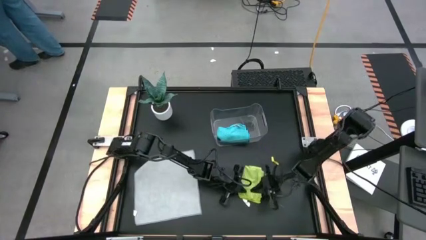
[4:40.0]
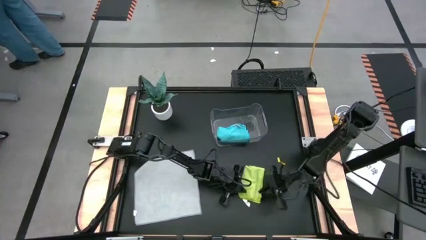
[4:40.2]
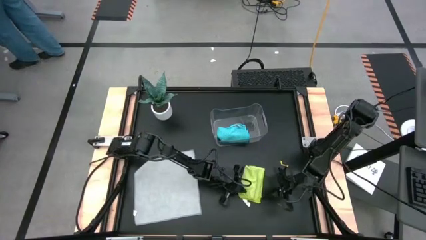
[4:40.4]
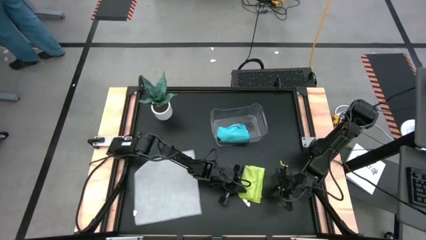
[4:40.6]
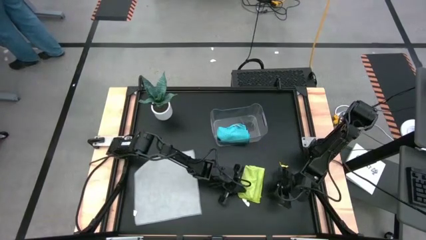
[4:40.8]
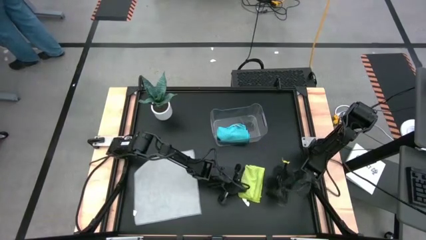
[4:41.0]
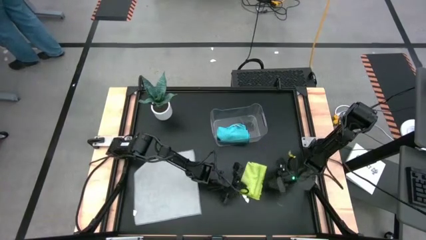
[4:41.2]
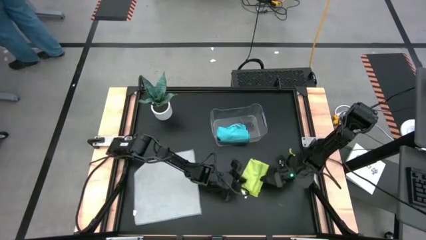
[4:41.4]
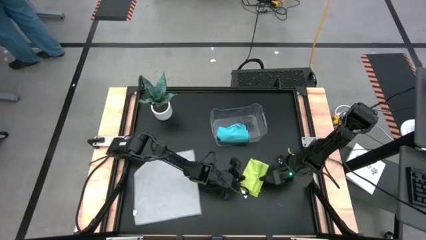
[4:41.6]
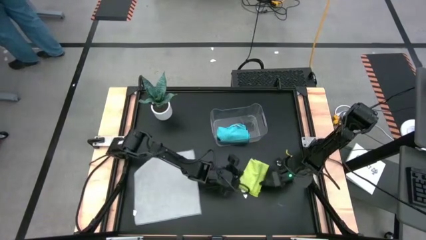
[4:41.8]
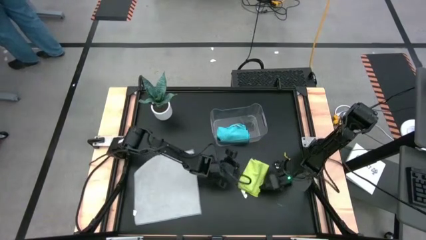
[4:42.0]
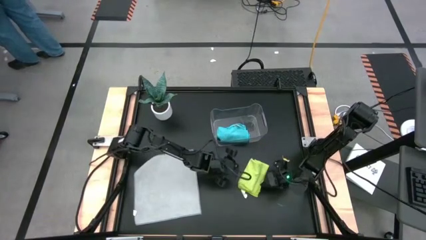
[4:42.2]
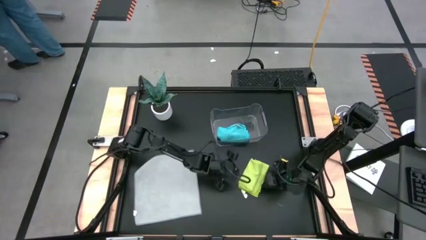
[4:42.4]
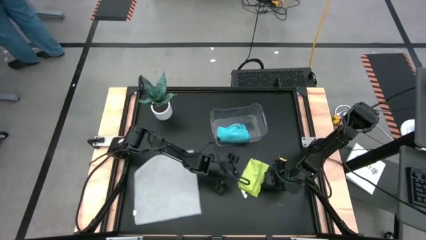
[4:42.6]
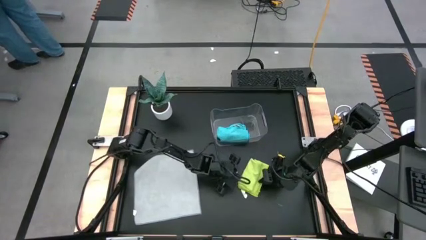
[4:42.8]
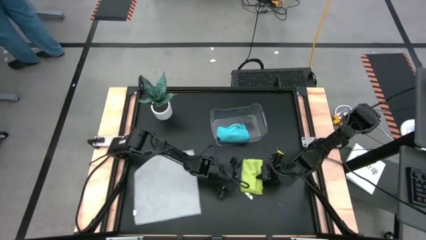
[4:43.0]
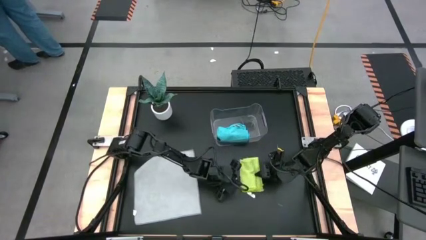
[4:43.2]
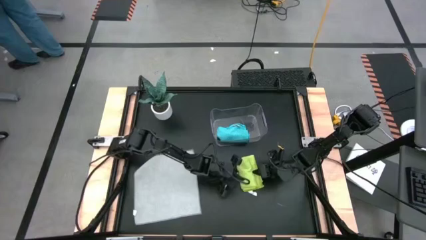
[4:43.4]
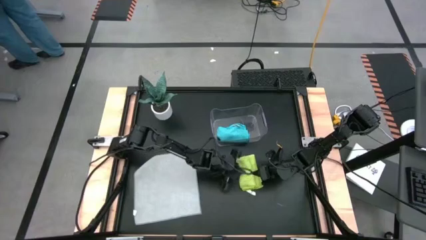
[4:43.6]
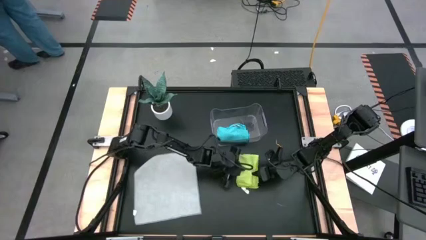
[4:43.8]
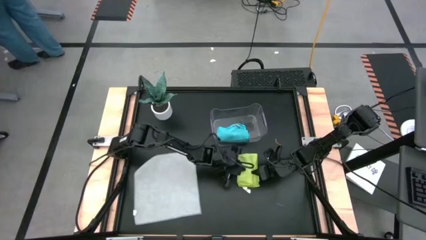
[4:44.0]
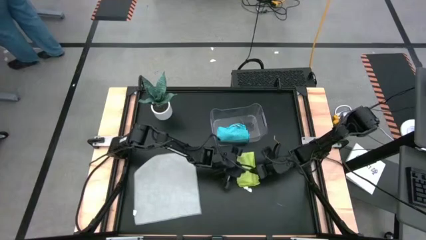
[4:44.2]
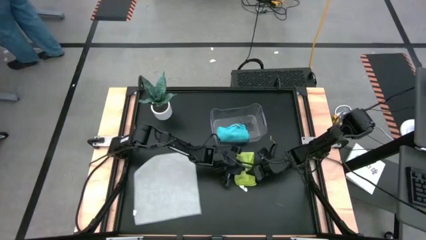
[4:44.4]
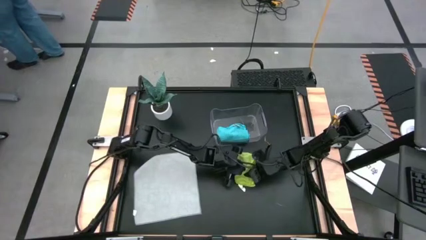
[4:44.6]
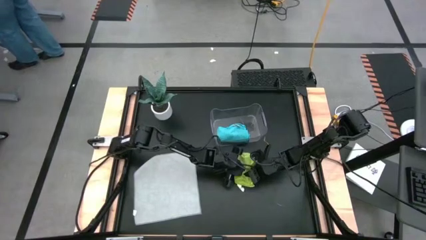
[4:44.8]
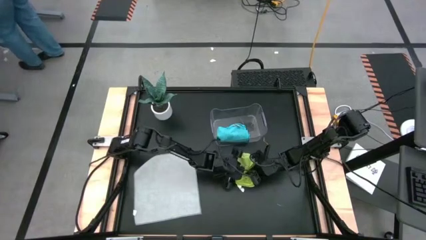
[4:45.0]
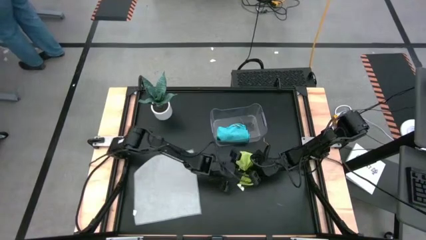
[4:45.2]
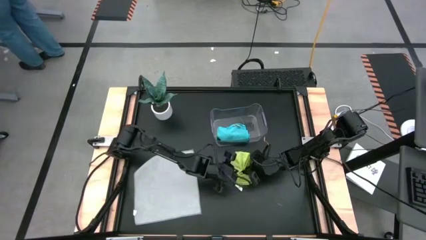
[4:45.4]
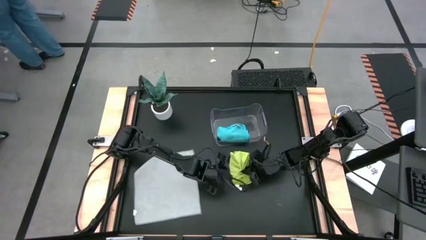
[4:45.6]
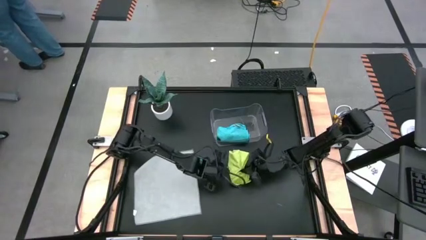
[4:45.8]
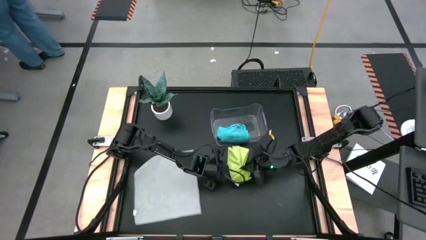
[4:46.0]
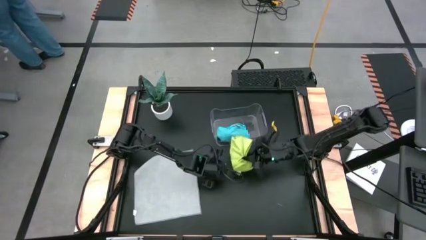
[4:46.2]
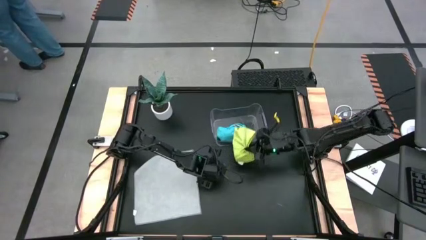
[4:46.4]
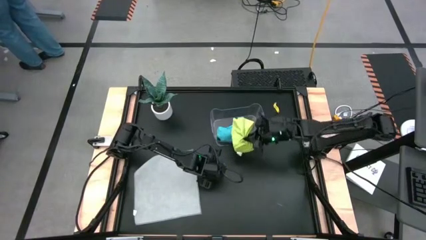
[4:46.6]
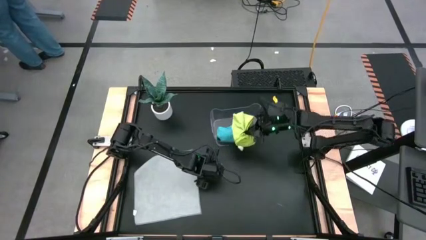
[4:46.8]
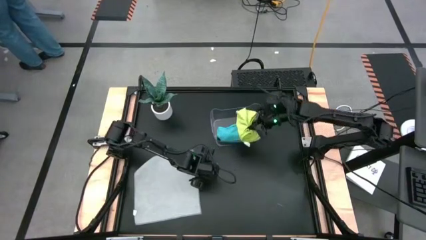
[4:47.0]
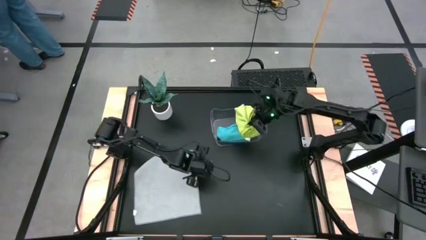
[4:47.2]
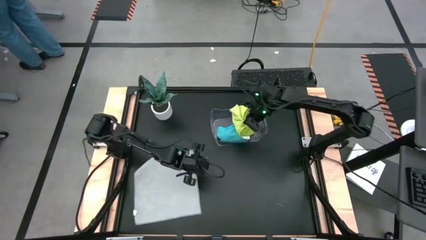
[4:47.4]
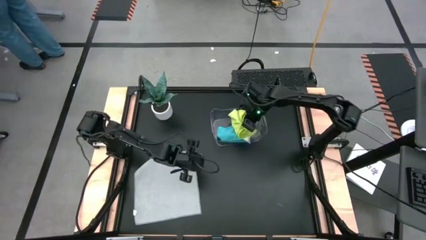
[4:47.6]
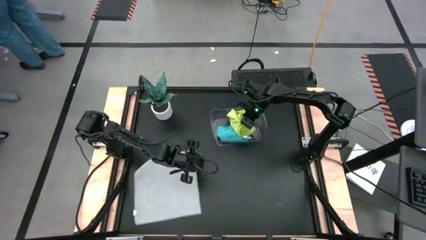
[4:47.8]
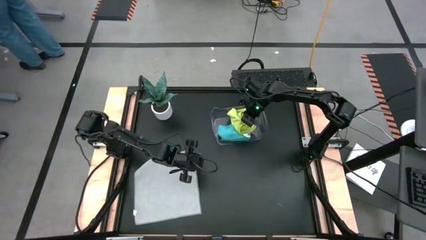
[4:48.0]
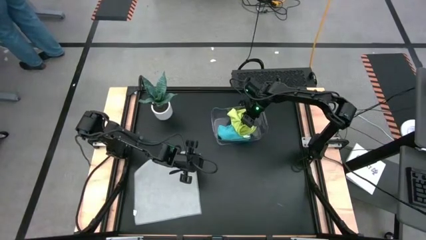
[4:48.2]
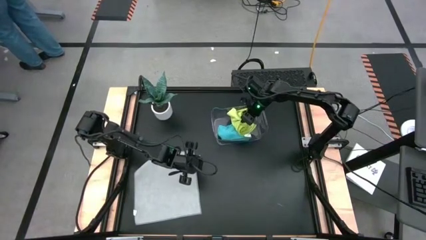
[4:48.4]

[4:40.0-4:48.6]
Task: Fold microfiber towels
Put the green towel into the bin

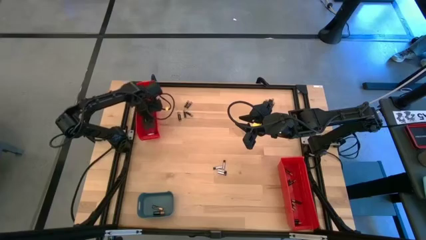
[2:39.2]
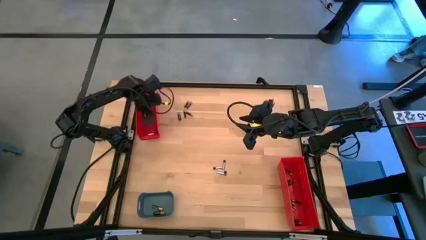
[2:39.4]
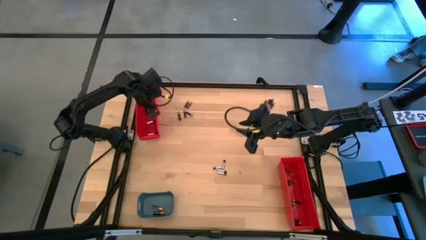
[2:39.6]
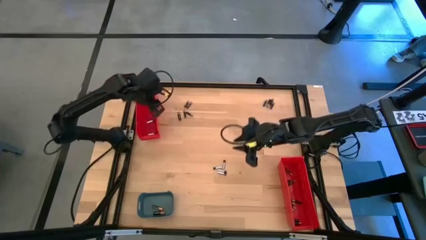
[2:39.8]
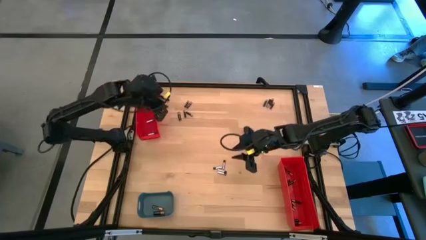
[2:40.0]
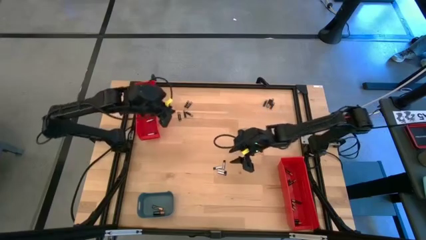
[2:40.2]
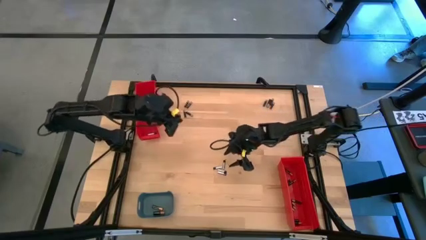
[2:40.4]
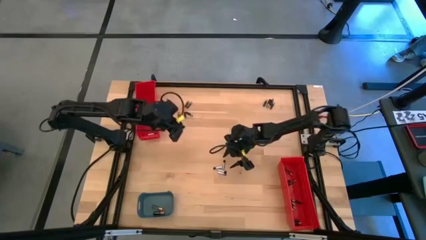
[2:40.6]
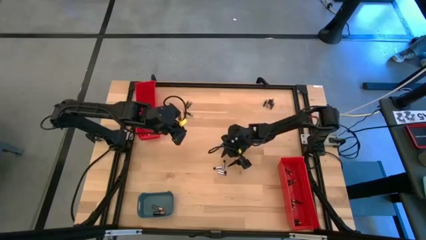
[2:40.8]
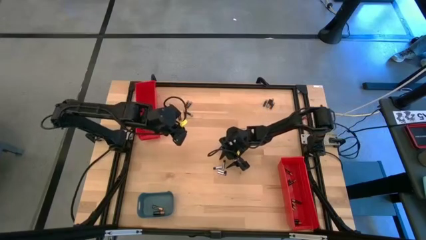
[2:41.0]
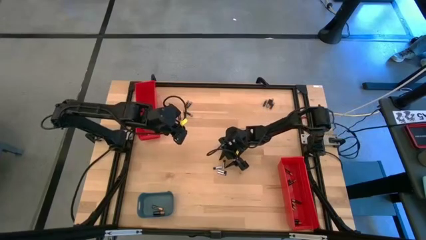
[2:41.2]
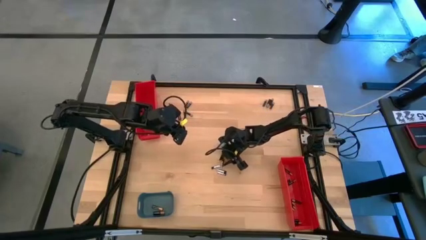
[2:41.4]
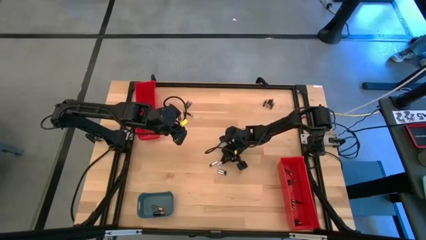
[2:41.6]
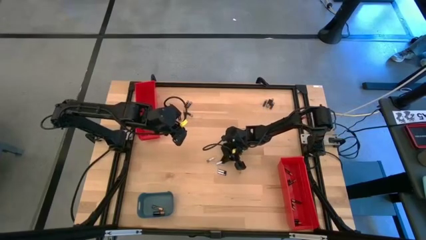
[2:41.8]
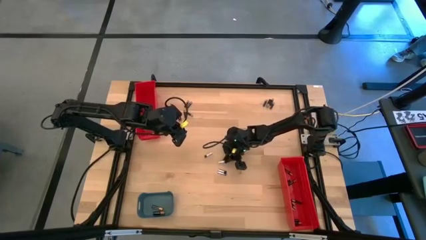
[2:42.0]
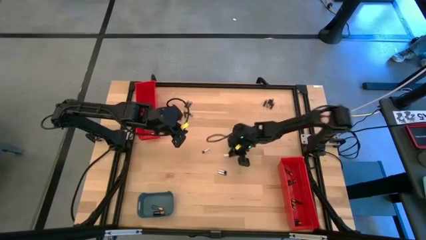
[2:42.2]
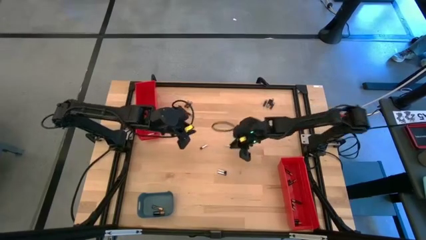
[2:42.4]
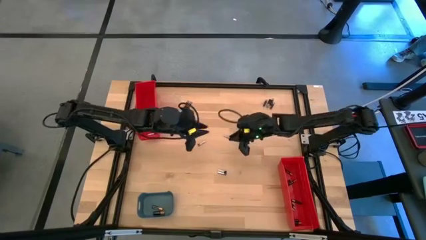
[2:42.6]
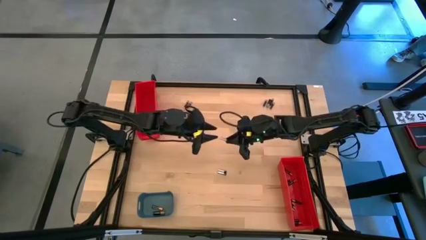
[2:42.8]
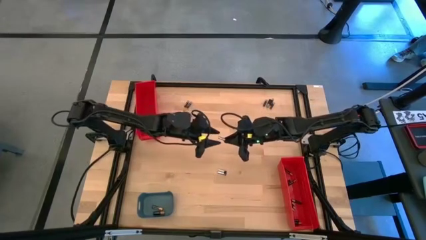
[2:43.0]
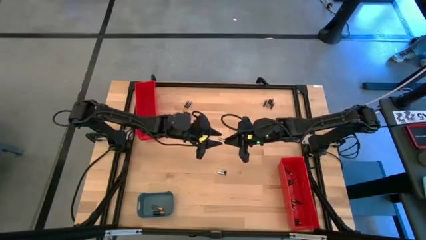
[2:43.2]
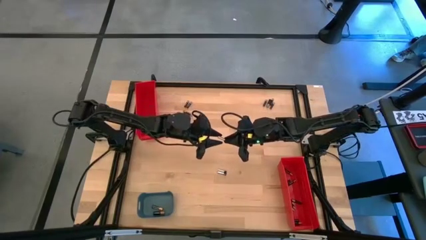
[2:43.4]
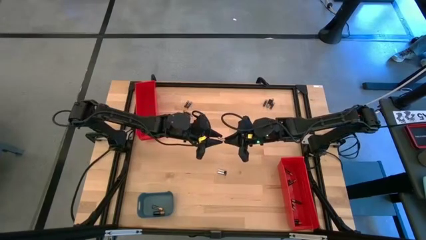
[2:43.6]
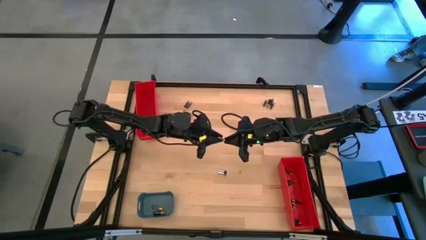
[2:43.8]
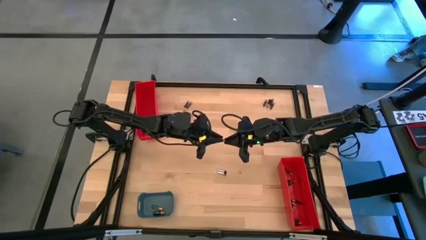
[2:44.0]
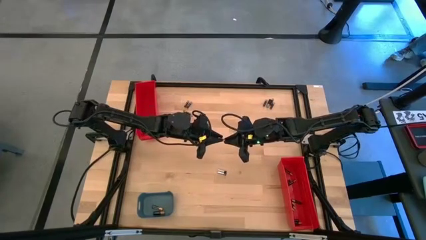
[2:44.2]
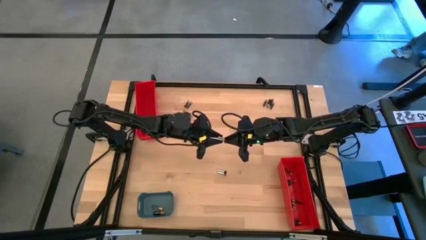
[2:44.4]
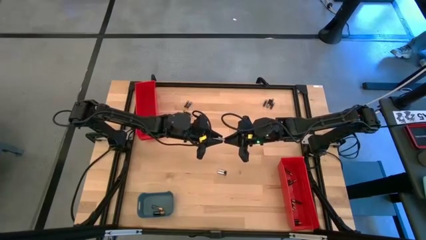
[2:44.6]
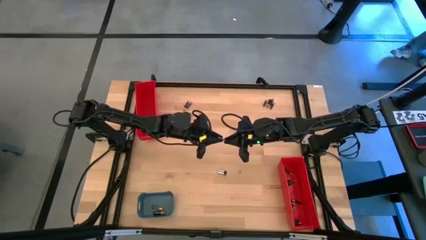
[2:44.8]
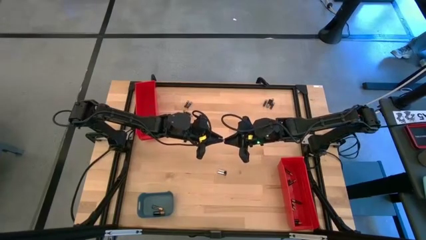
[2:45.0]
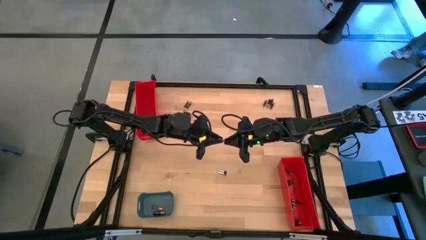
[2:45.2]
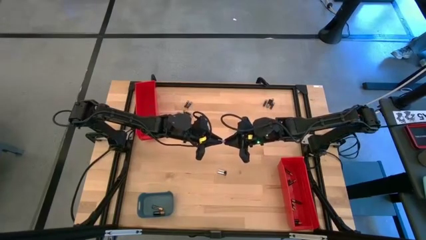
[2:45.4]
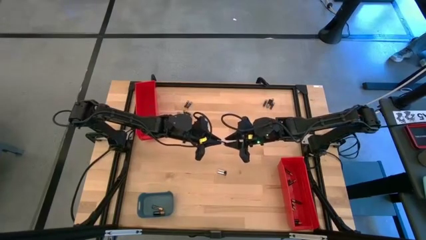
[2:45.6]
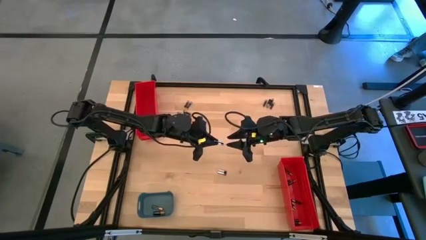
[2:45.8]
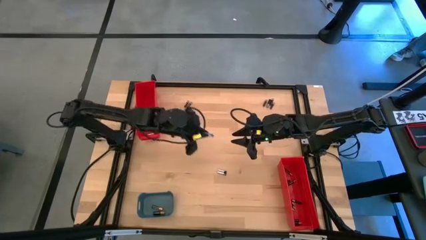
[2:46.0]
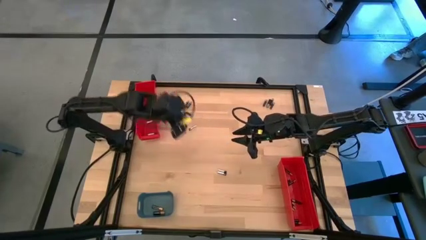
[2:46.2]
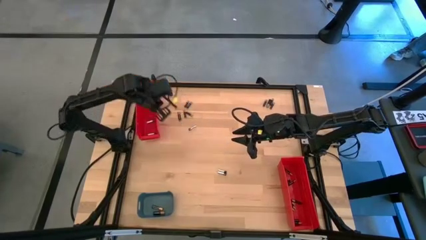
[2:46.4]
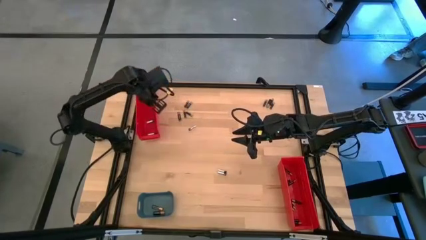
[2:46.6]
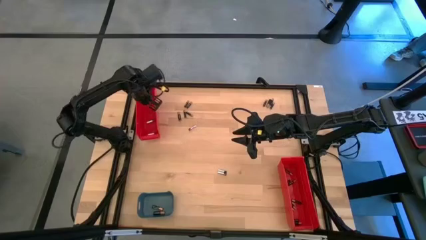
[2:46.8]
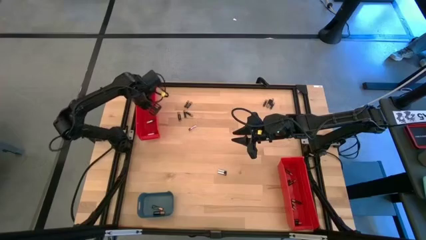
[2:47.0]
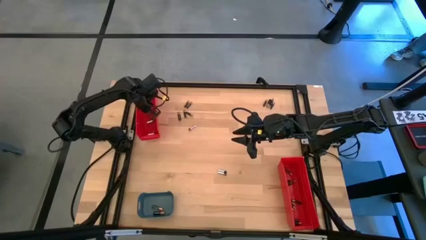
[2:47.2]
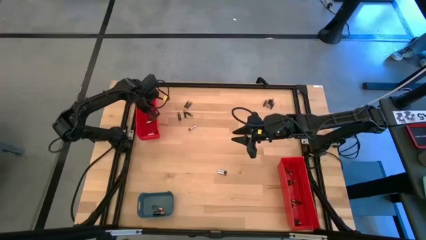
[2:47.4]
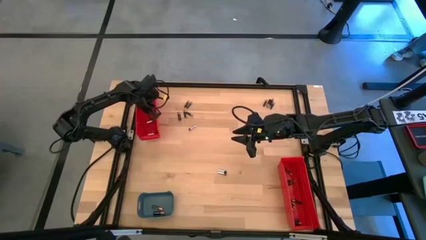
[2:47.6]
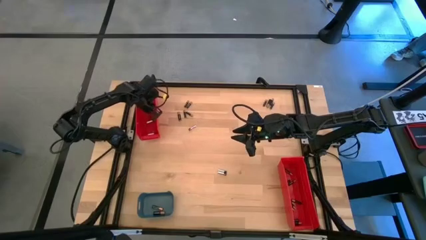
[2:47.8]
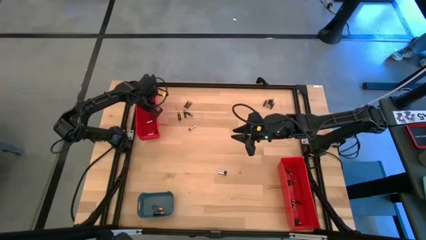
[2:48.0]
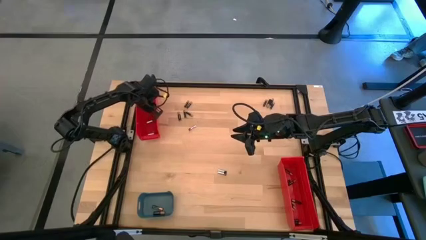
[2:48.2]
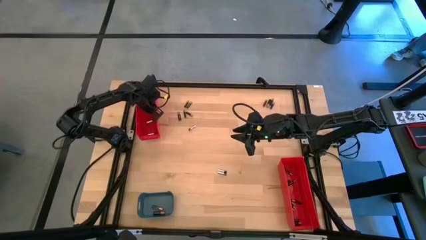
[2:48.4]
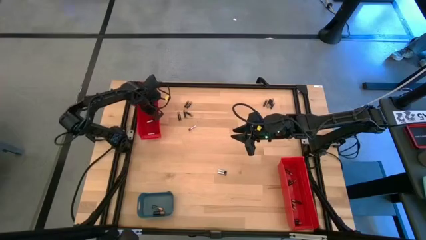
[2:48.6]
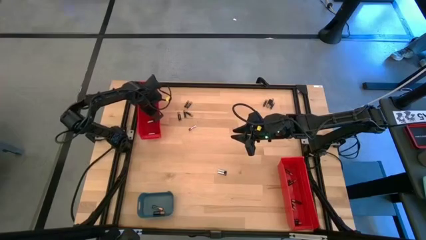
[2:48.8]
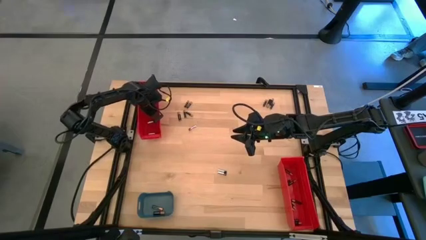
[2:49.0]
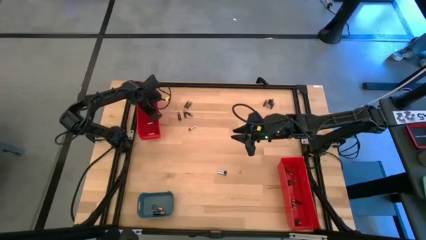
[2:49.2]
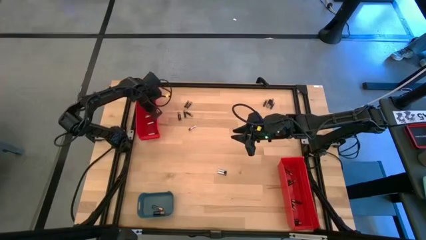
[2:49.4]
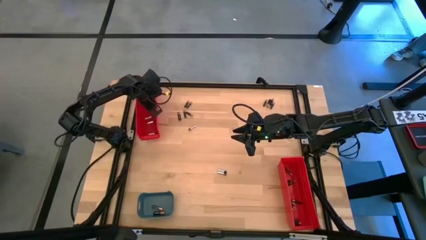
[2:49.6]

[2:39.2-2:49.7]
Task: Sort batteries
Put the silver battery into the top red bin
